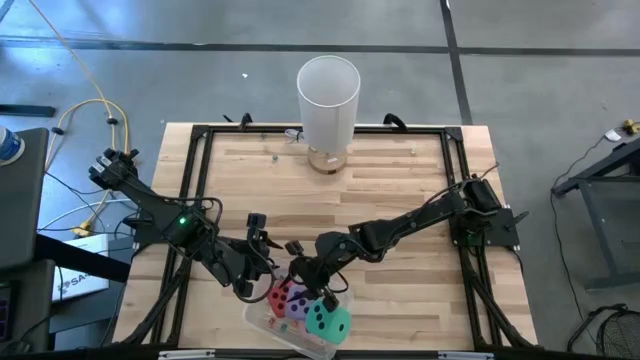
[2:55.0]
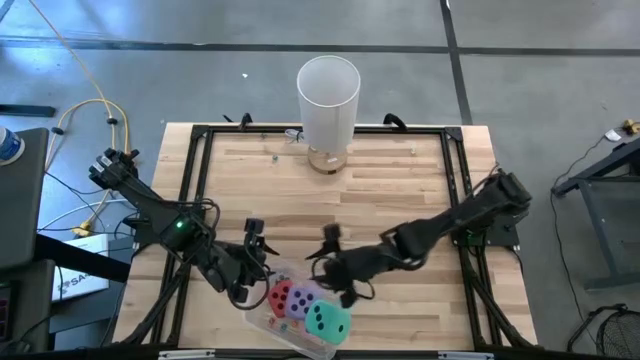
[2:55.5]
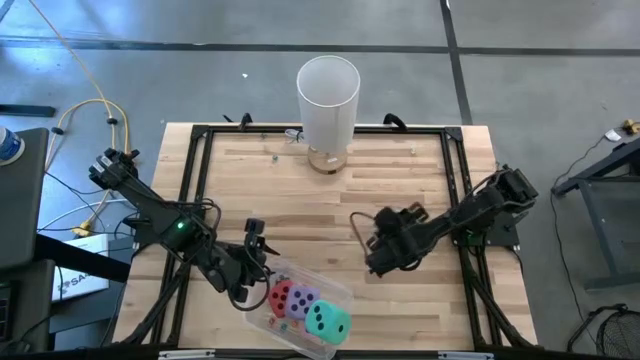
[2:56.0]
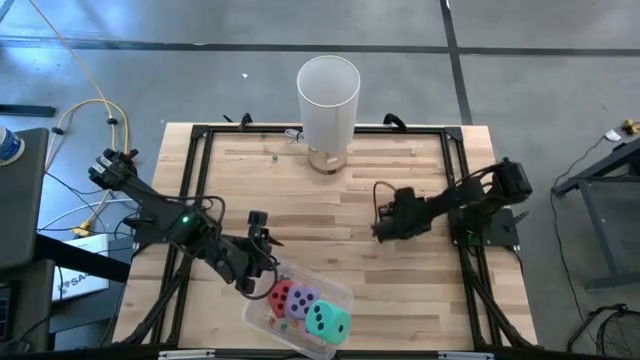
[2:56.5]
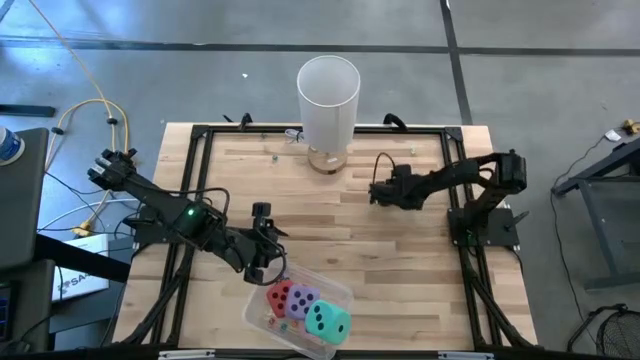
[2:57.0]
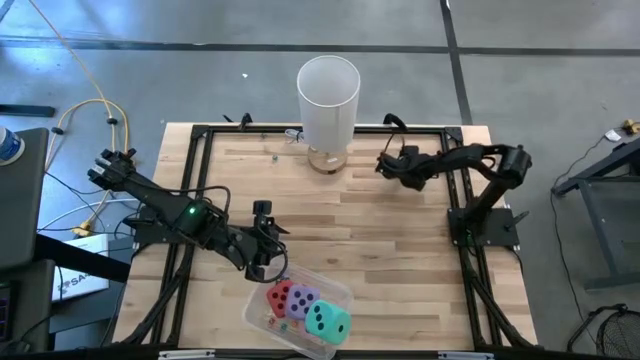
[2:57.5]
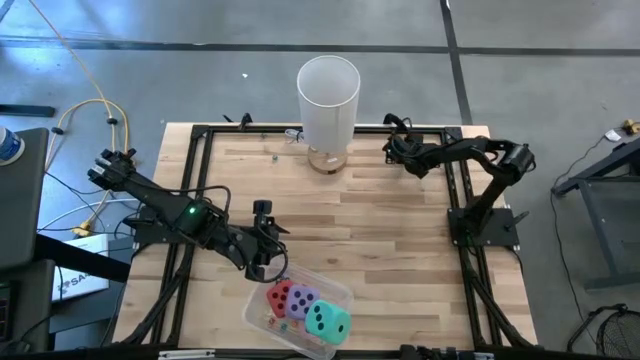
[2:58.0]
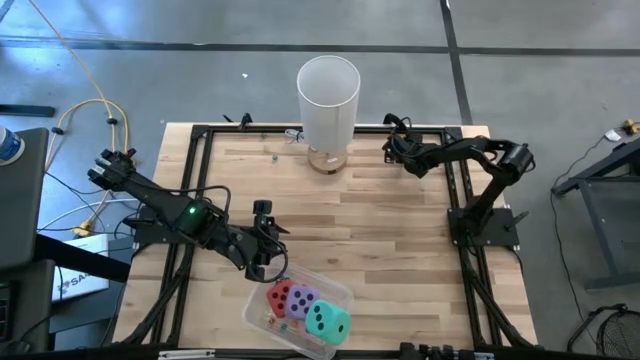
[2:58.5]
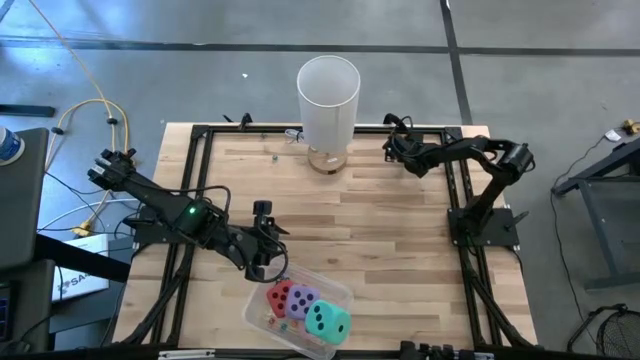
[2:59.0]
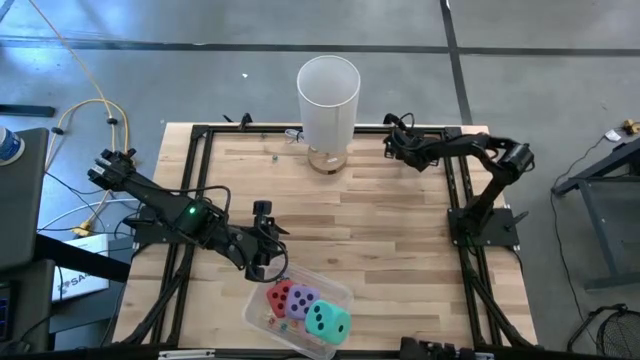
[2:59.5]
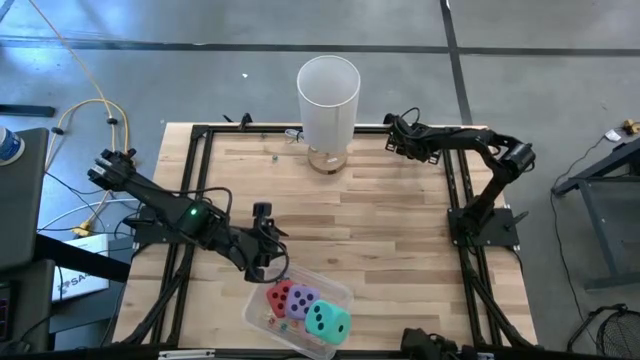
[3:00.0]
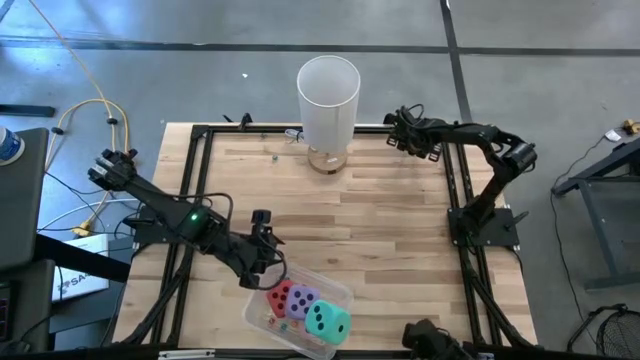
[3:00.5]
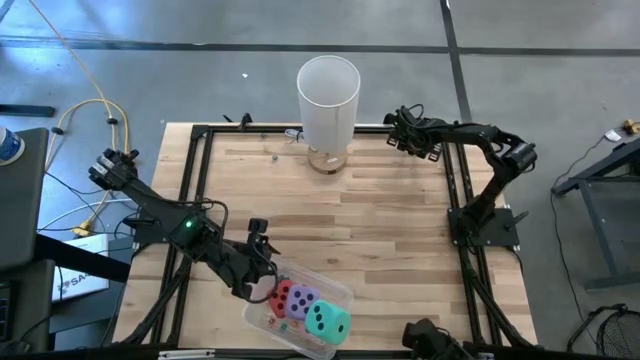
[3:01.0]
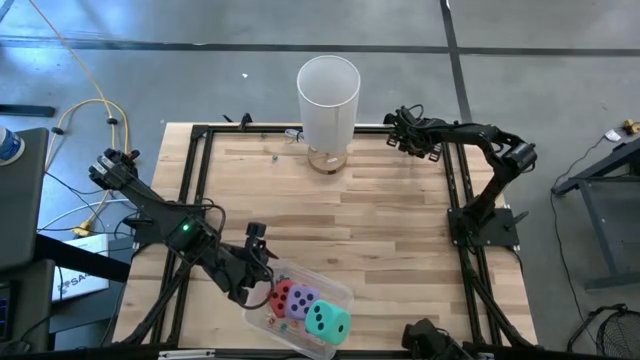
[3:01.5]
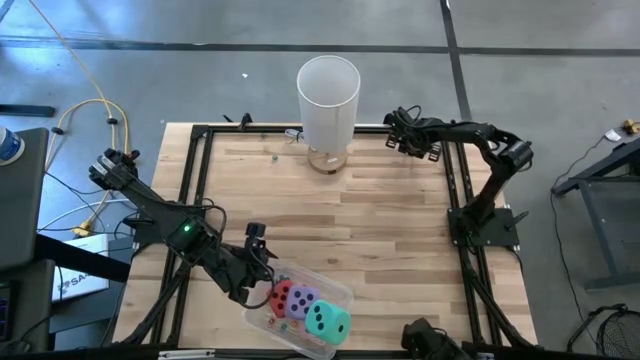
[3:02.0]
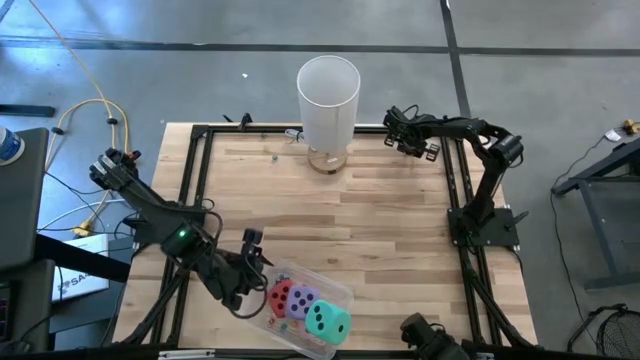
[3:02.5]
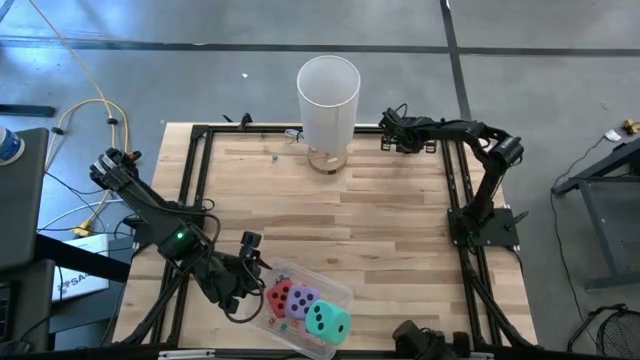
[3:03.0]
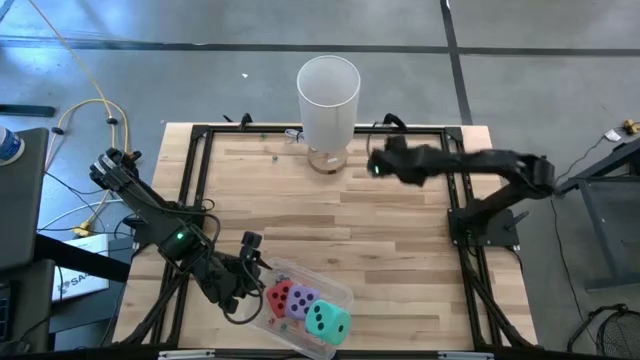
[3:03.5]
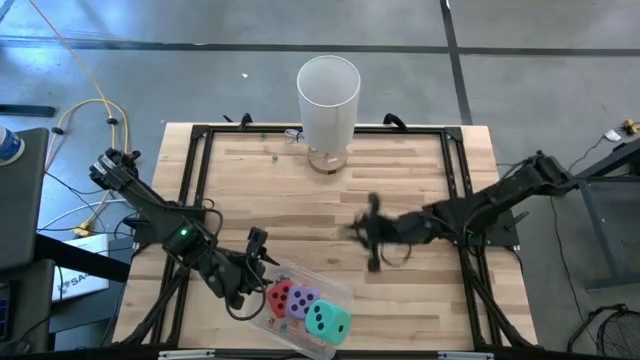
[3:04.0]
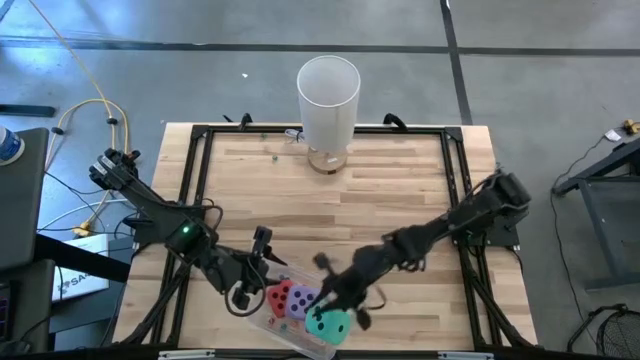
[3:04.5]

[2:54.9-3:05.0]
Task: Pick & Place Dice
Put the small light green into the transparent bin

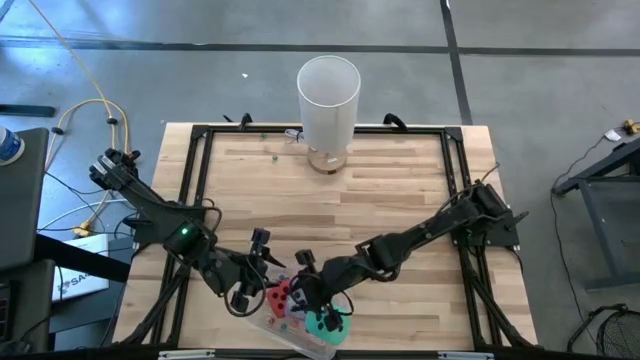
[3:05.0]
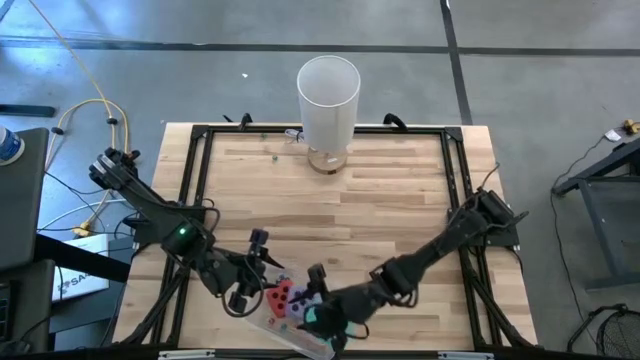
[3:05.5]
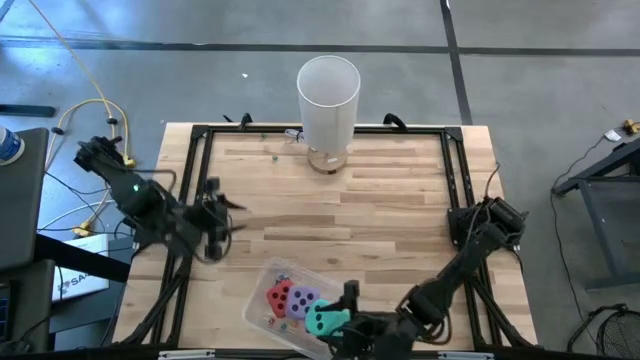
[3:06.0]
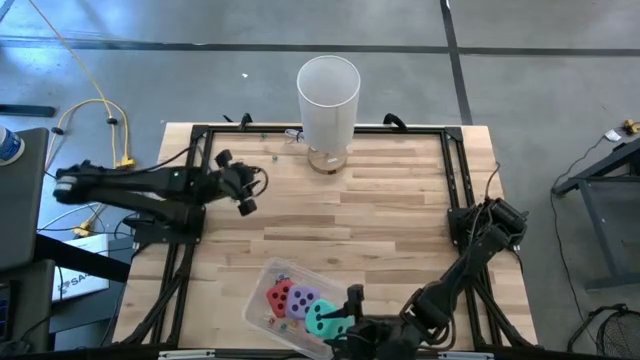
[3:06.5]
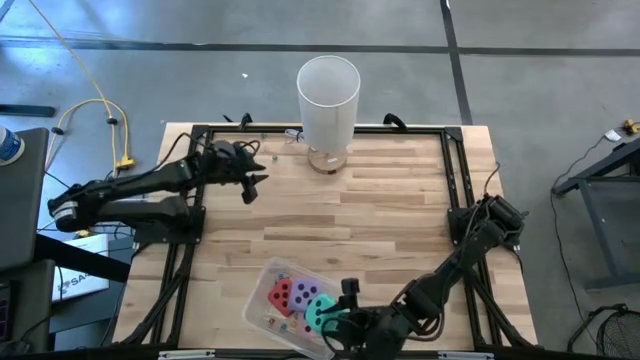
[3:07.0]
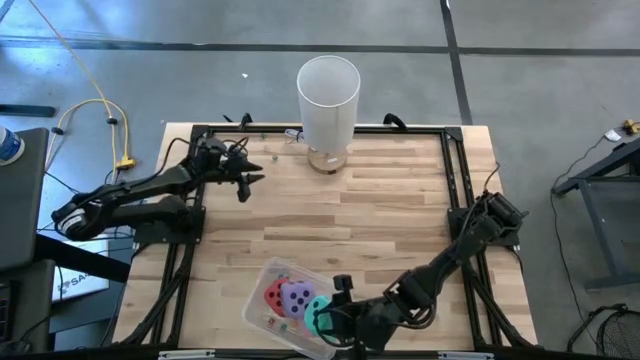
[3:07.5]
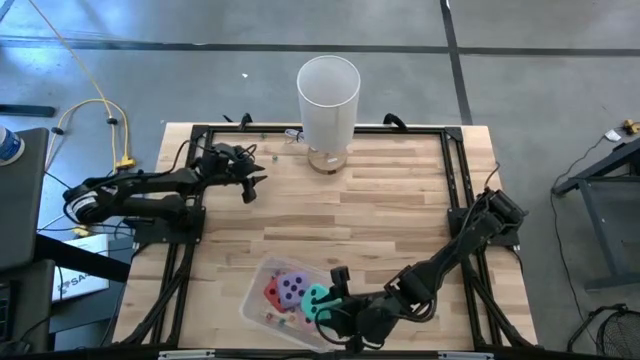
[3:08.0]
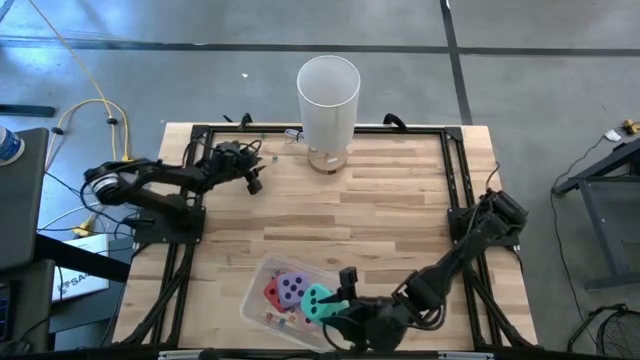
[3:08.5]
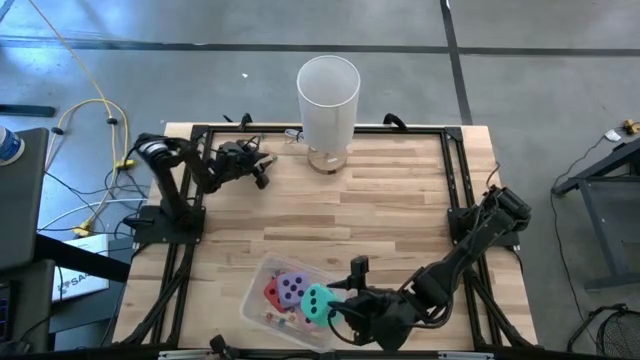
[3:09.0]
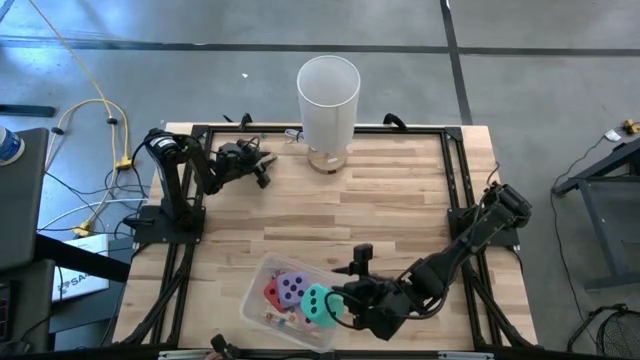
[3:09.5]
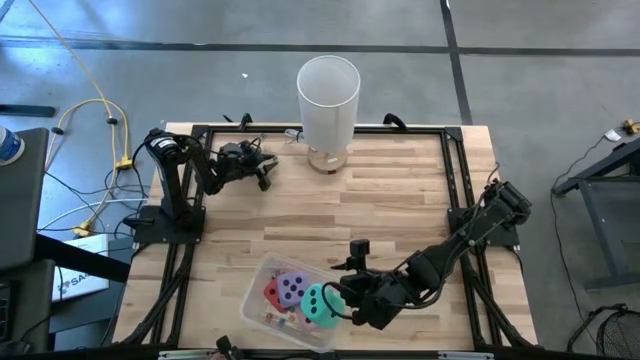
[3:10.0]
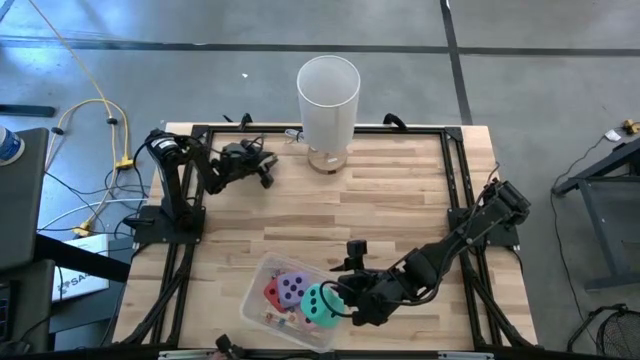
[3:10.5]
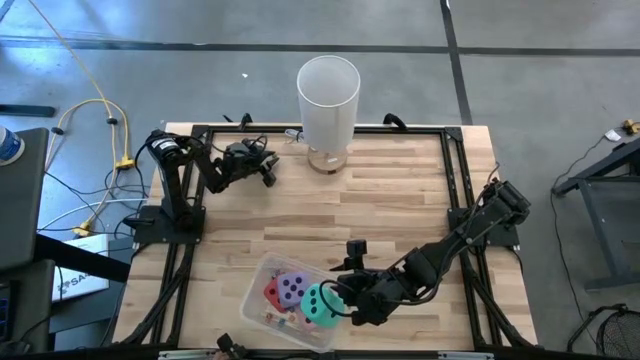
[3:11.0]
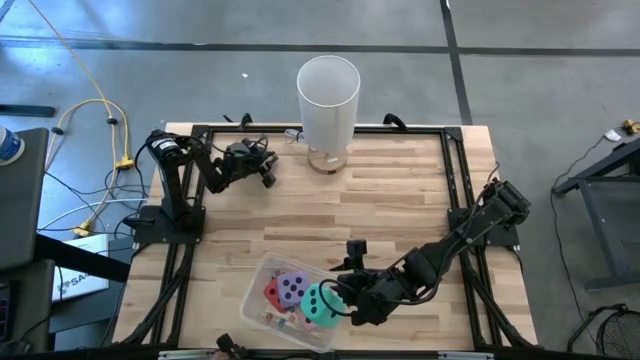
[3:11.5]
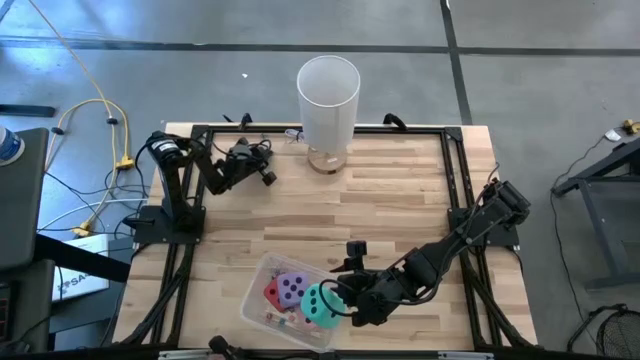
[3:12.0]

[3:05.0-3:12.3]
Put the small green dice into the transparent bin

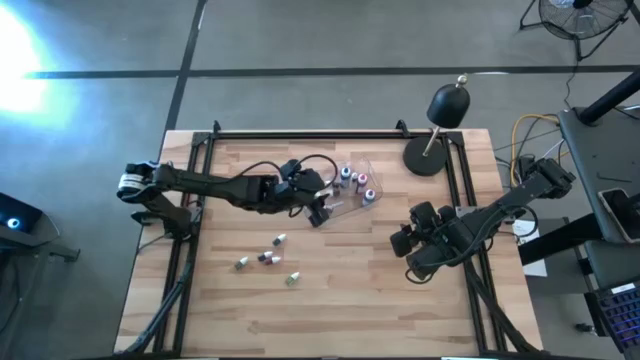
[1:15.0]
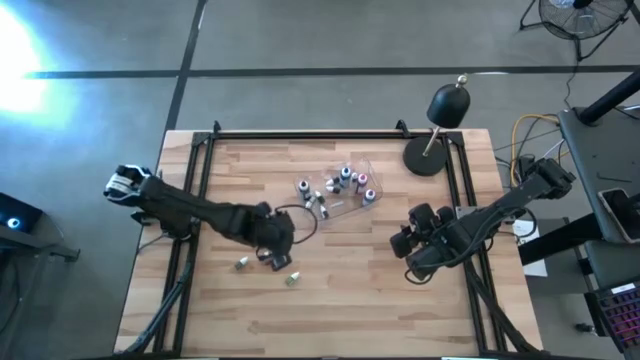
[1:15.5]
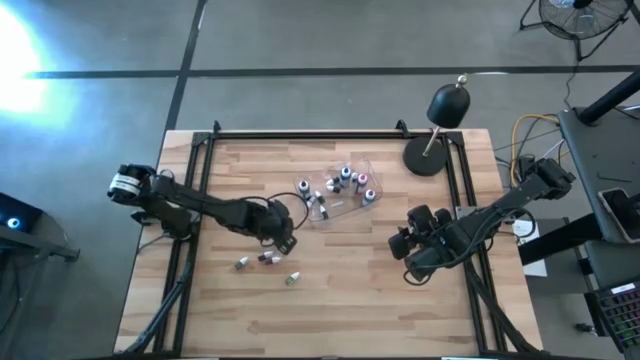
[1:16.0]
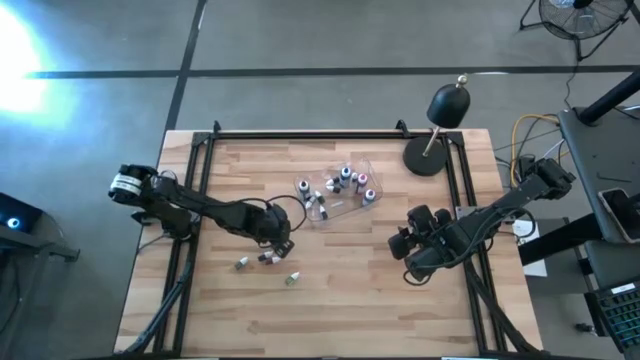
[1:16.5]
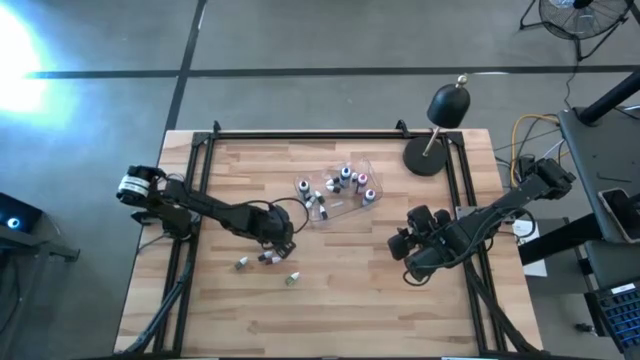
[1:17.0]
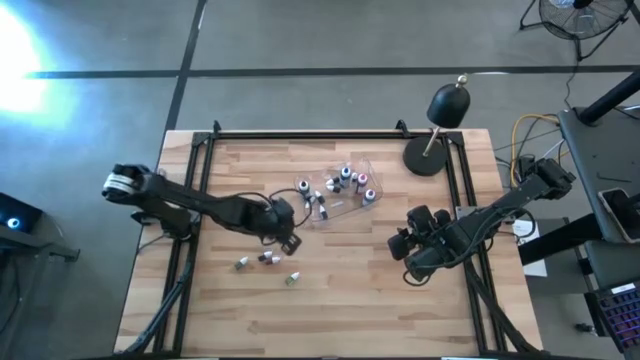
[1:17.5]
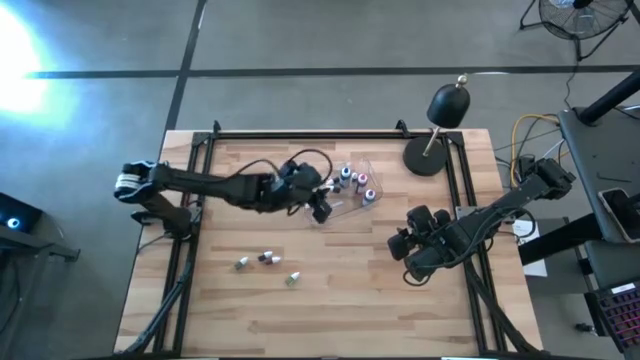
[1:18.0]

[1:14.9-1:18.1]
Task: Pick & Place food coloring
Put the small black food coloring bottle into the transparent bin

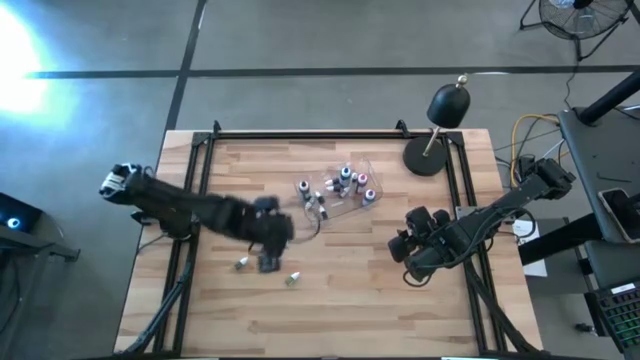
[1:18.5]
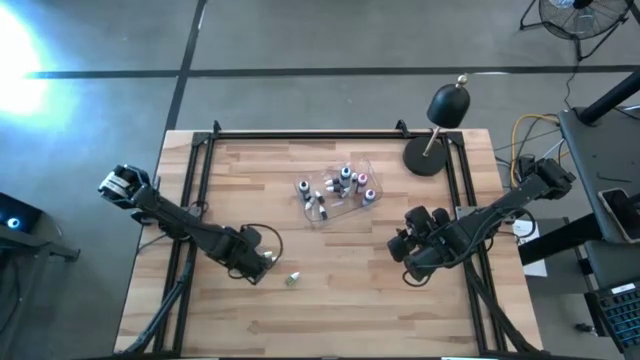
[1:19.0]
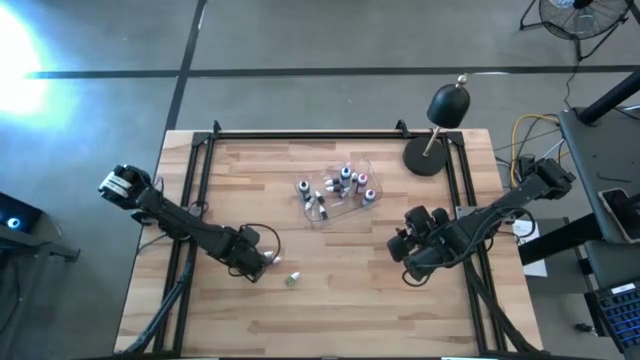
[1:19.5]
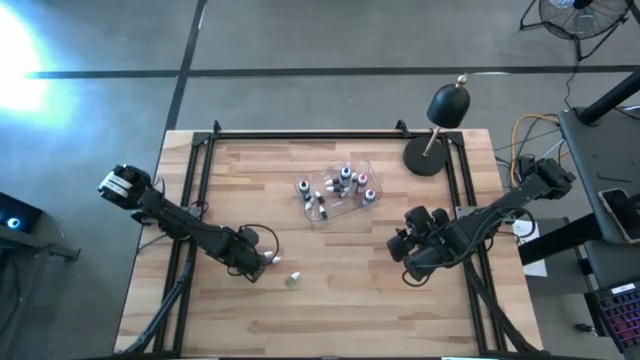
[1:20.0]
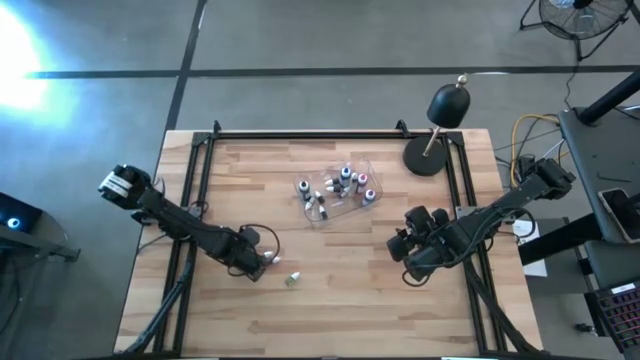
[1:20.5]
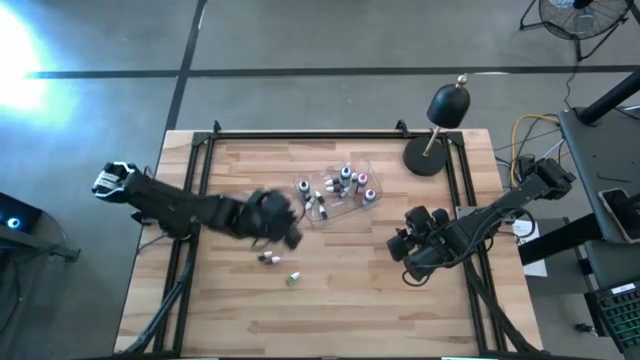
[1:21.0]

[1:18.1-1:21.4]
Put the small dark green food coloring bottle into the transparent bin
